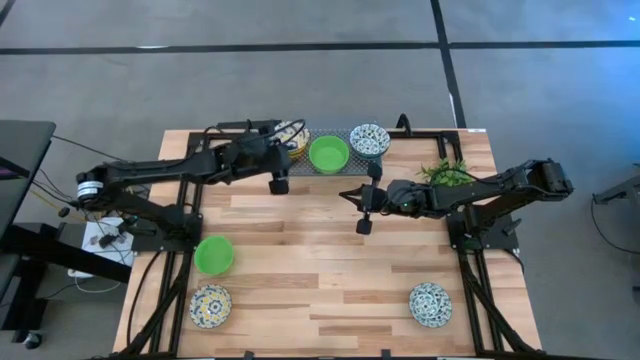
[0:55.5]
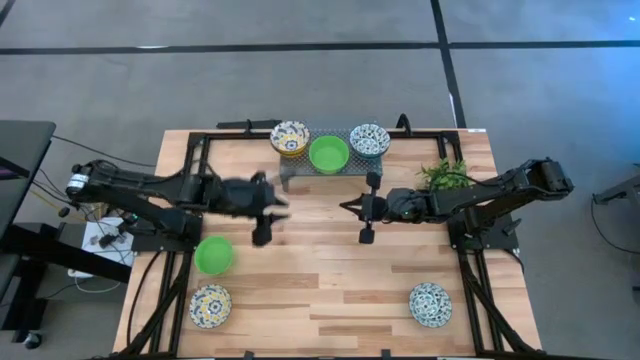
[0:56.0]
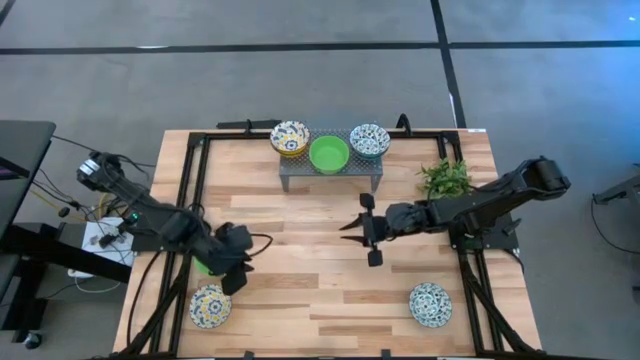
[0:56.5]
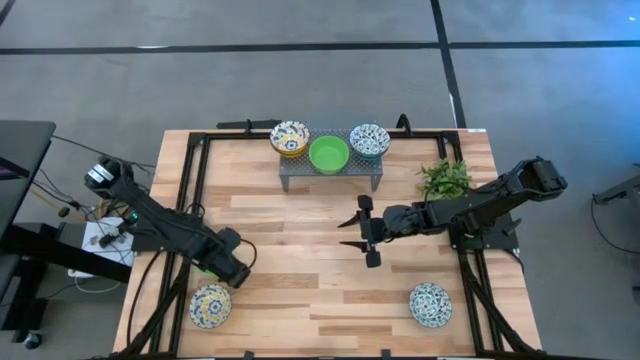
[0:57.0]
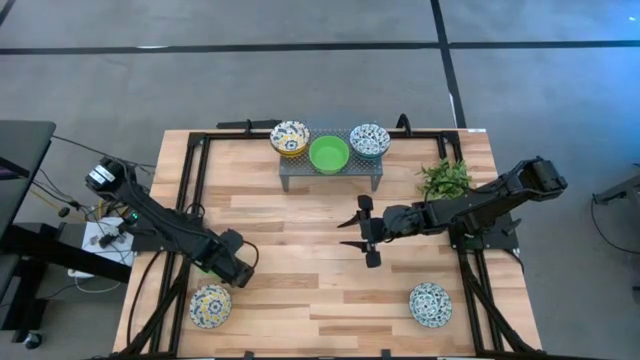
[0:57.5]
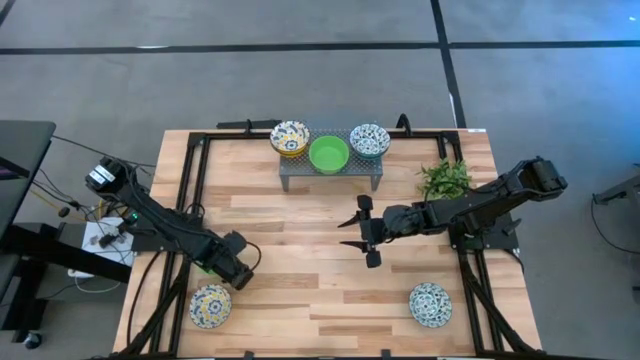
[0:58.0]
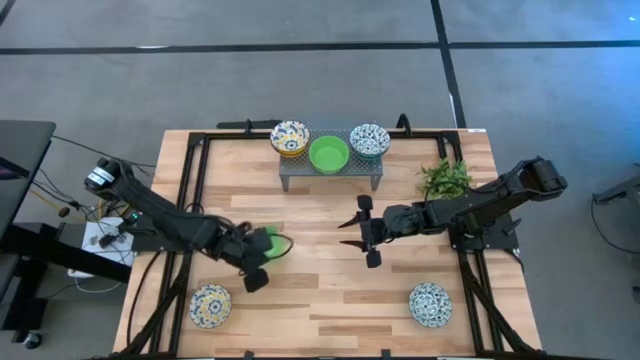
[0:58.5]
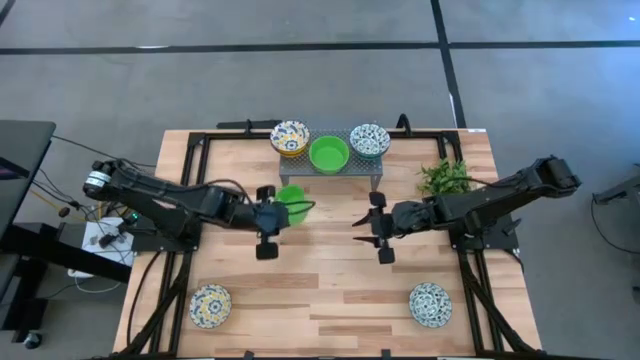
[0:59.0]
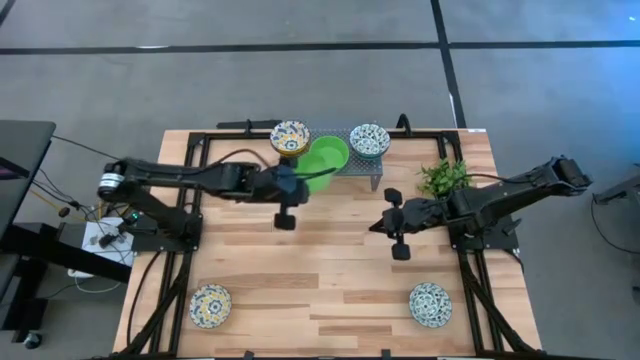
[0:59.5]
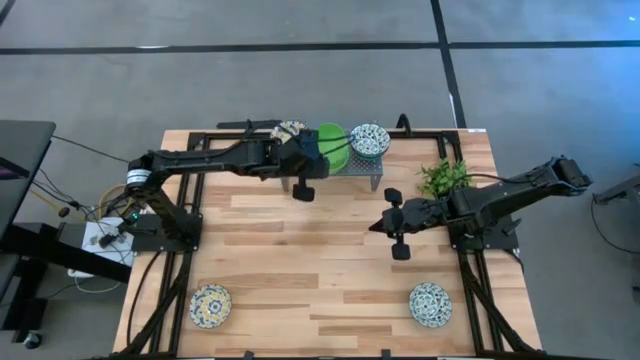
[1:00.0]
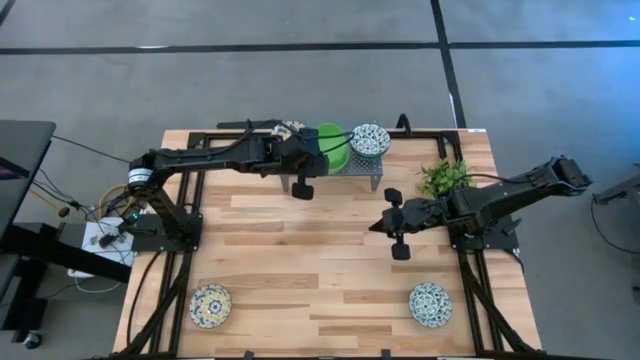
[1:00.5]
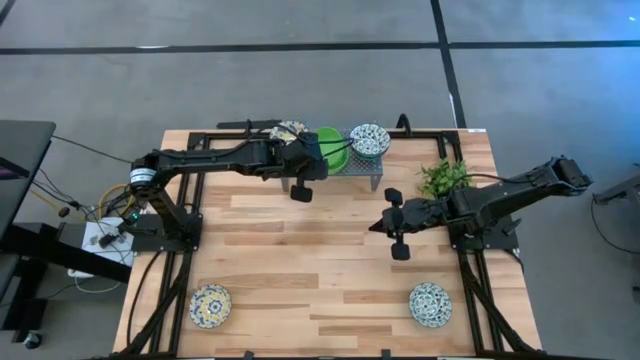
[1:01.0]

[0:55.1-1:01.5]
Task: Pick & Place Mini bowls
Stack the green bowl on top of the green bowls on the shelf

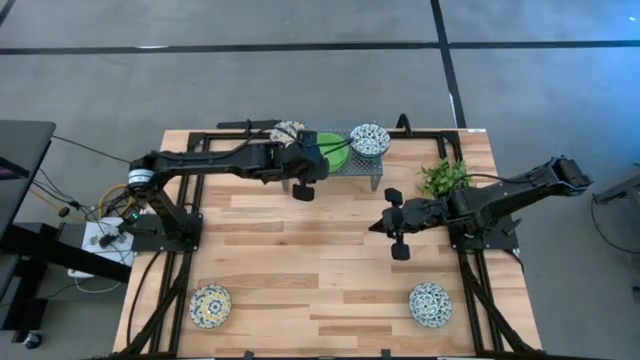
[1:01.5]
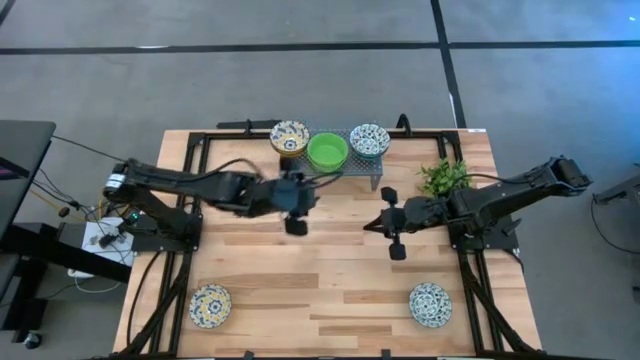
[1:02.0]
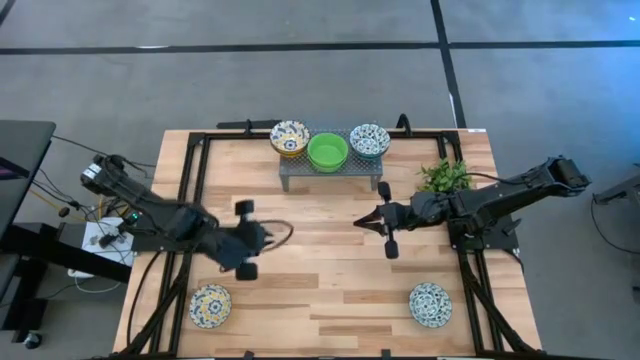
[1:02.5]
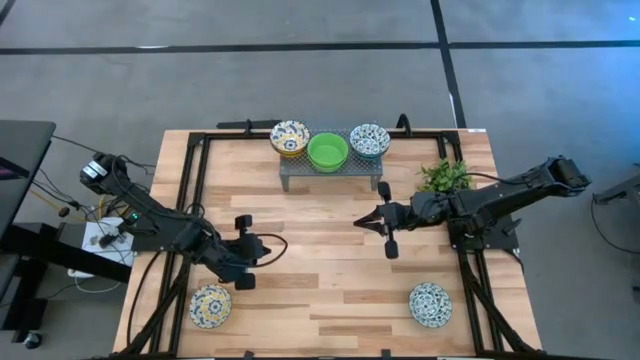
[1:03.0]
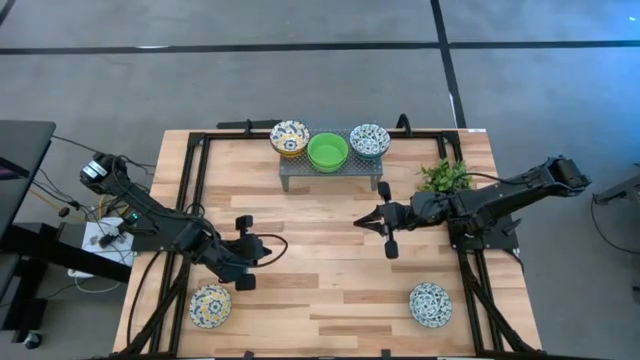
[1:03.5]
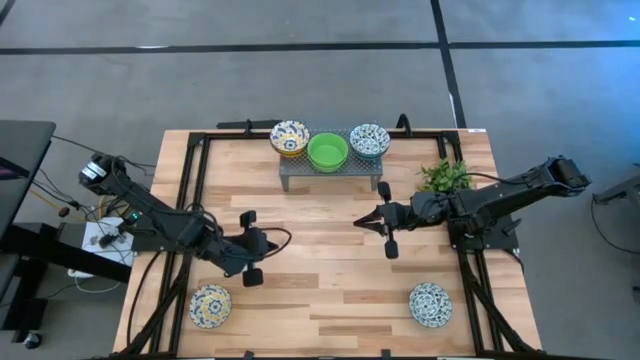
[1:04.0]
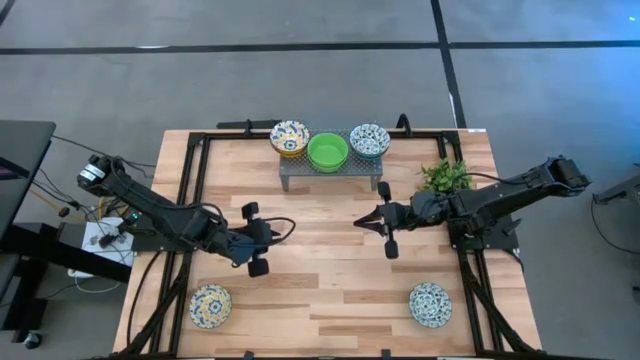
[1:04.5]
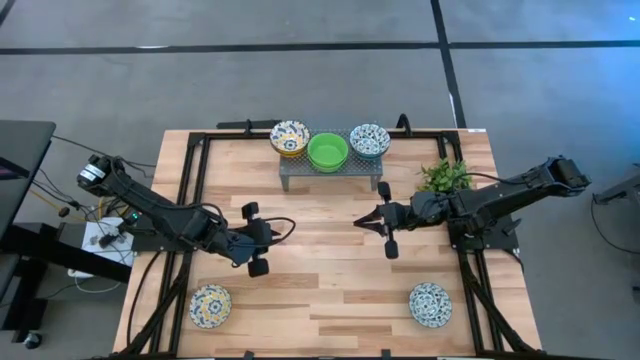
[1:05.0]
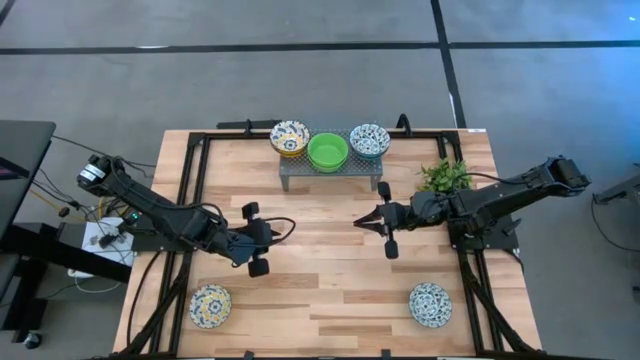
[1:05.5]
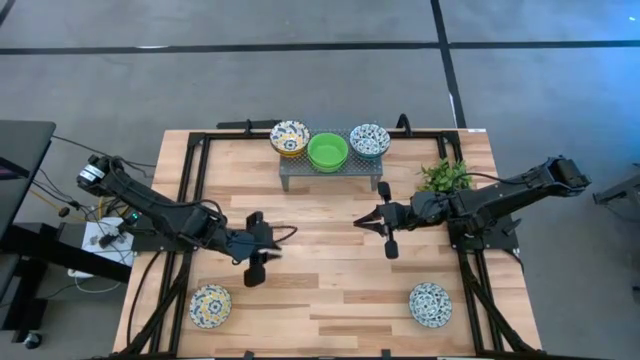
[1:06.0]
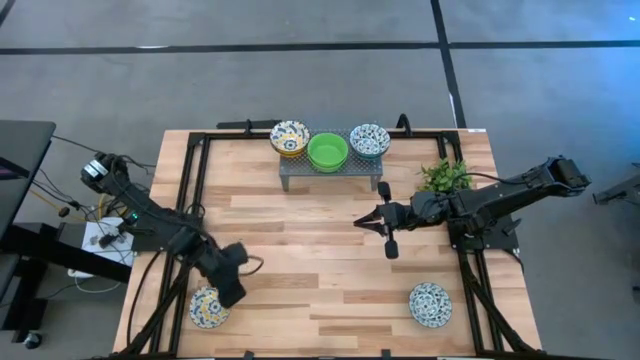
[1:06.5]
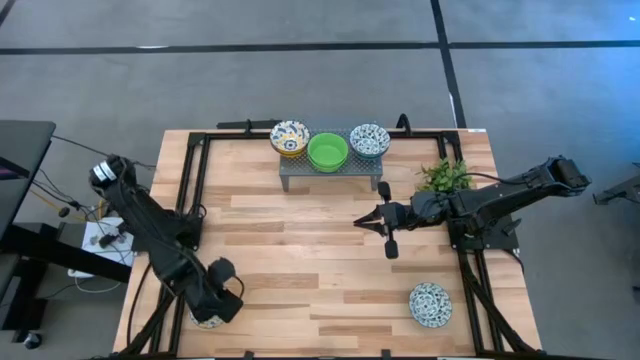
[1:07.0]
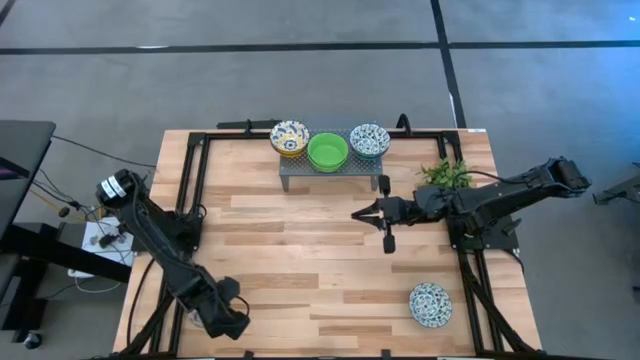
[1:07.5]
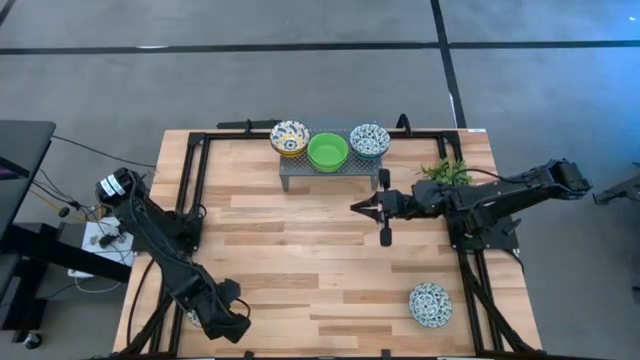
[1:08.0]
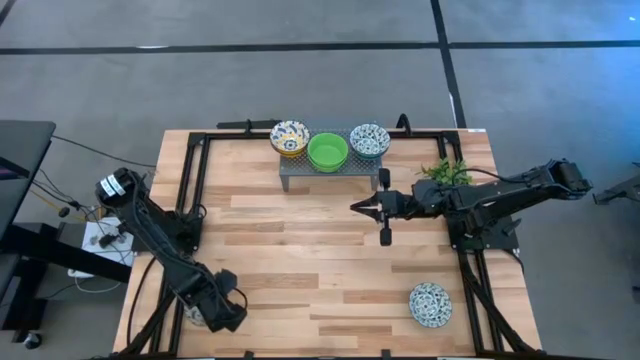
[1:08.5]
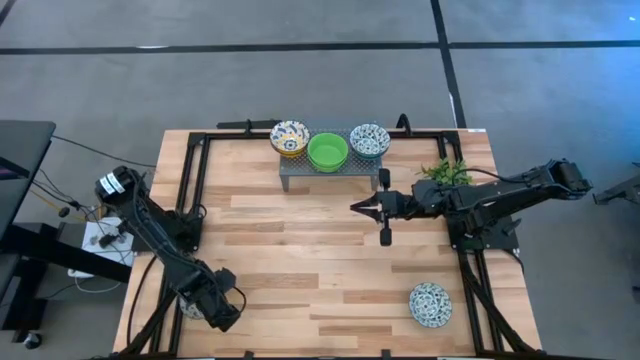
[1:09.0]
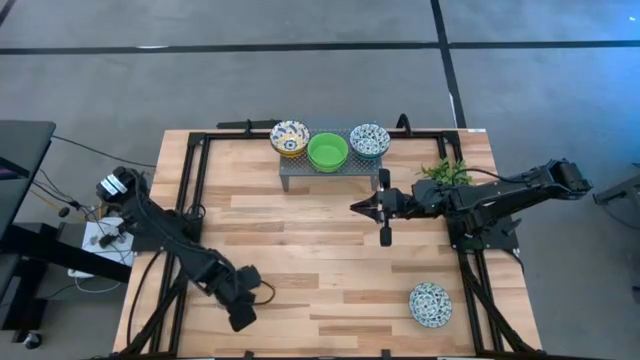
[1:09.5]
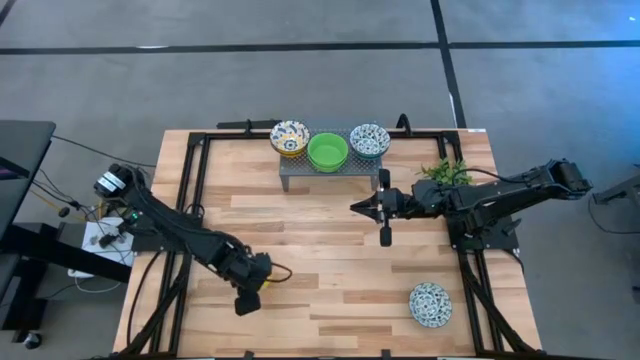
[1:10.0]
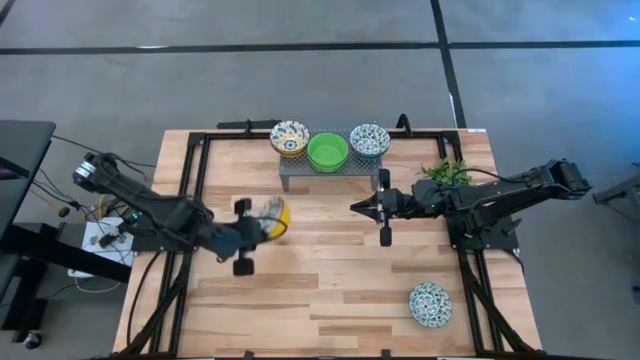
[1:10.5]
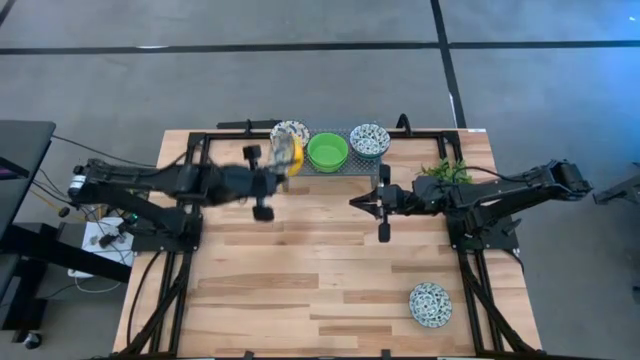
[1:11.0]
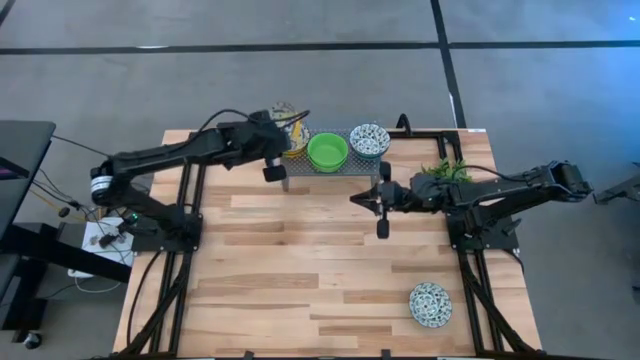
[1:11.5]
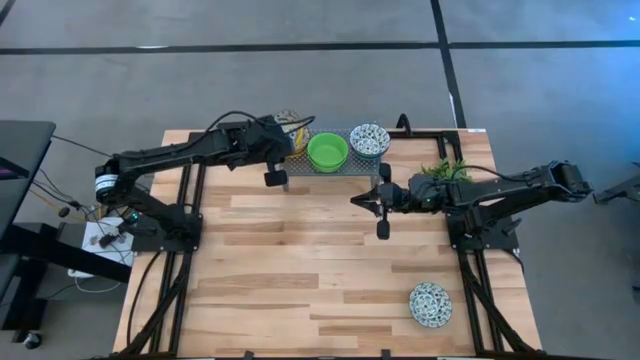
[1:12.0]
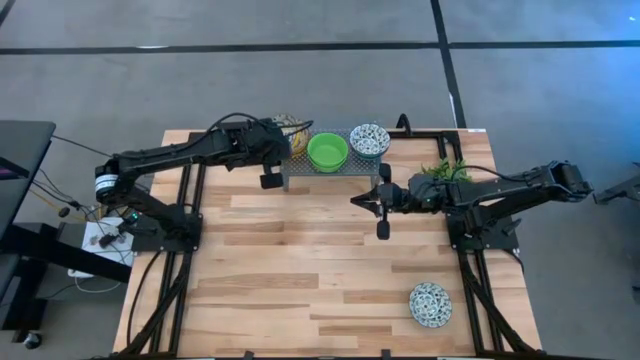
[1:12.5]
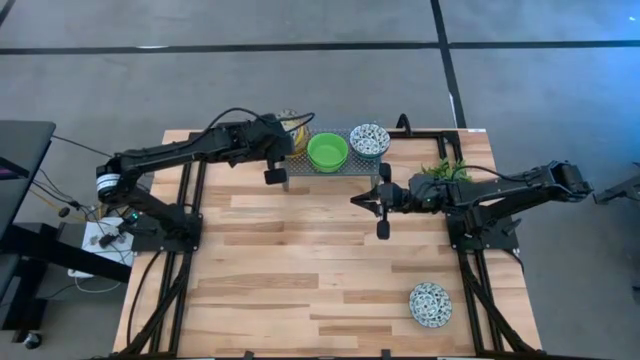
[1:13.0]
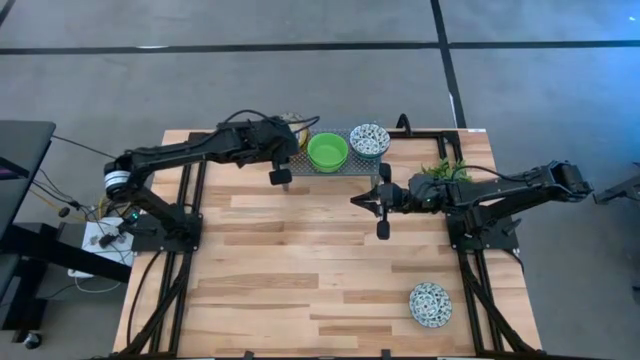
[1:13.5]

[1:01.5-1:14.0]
Stack the yellow patterned bowl on top of the yellow patterned bowls on the shelf

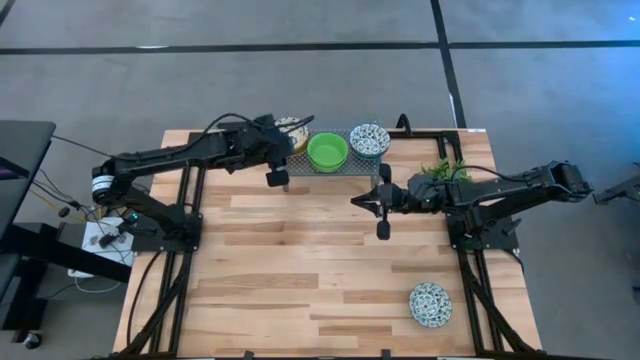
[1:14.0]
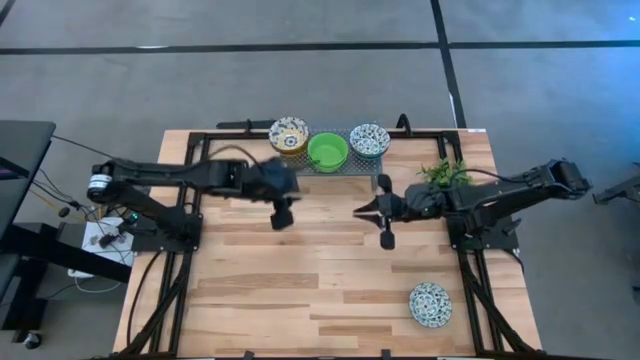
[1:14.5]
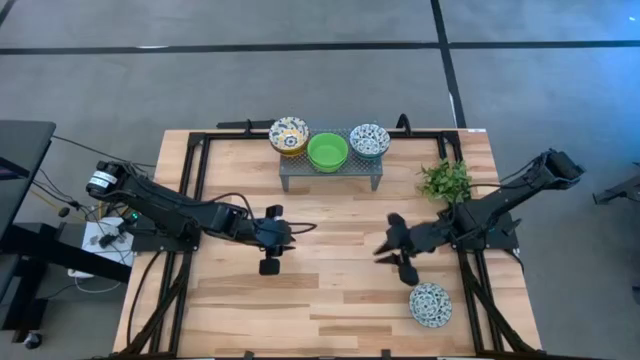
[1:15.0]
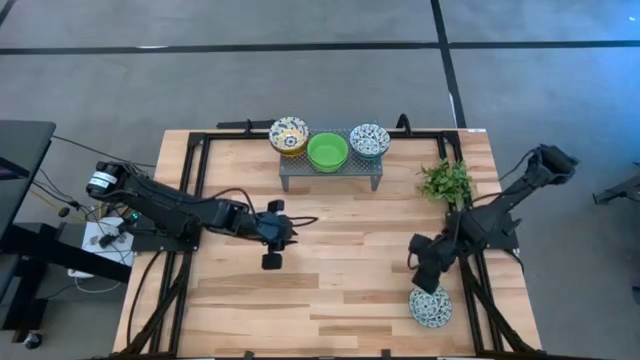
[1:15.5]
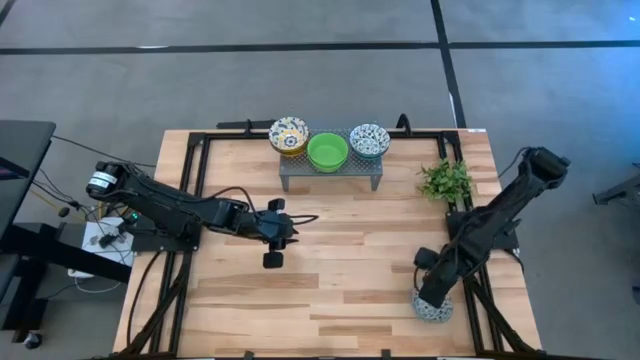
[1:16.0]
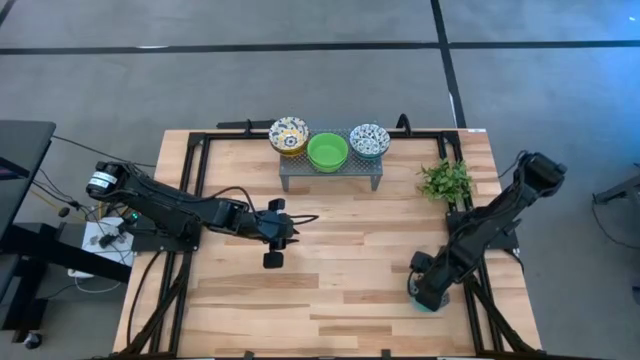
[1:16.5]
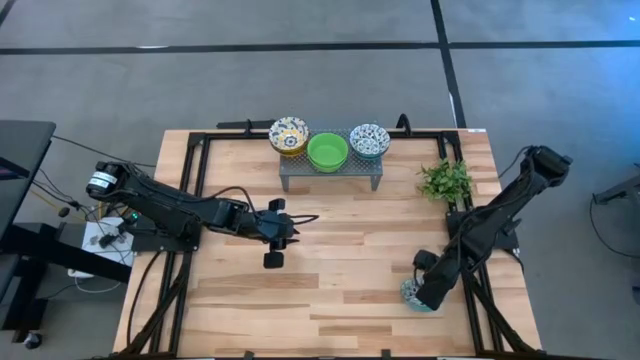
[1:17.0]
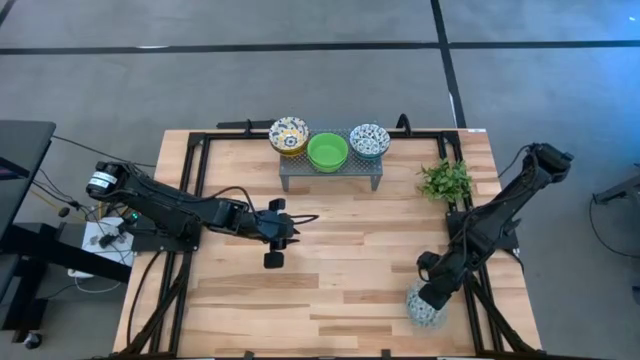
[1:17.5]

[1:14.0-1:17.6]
Stack the green patterned bowl on top of the green patterned bowls on the shelf
